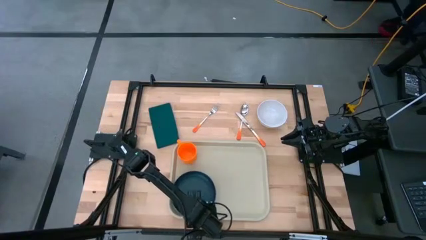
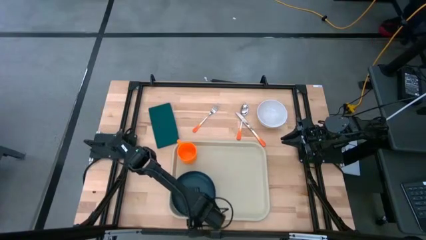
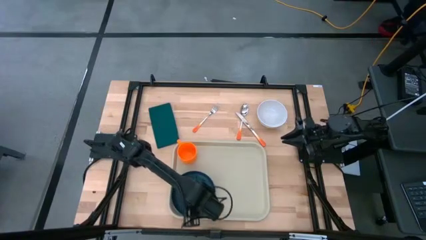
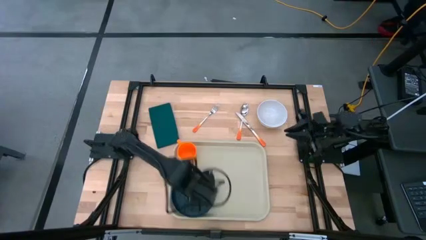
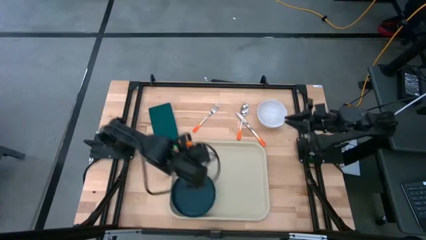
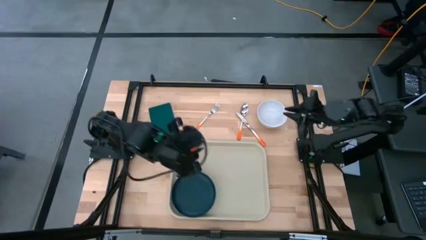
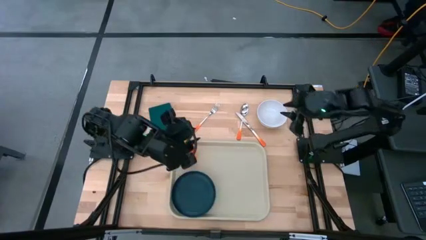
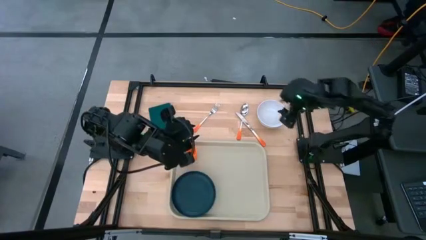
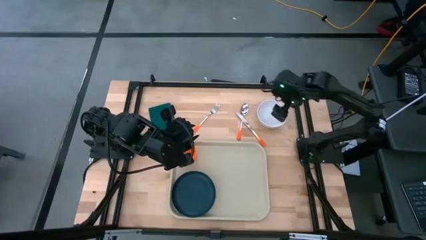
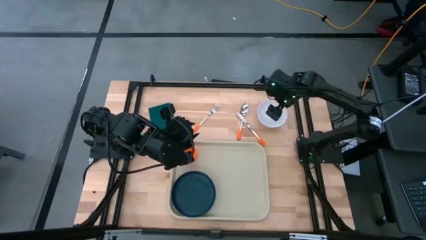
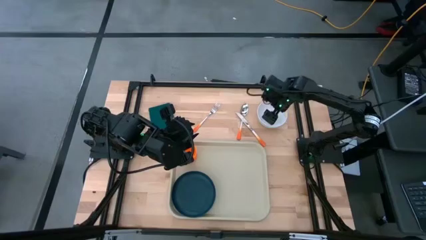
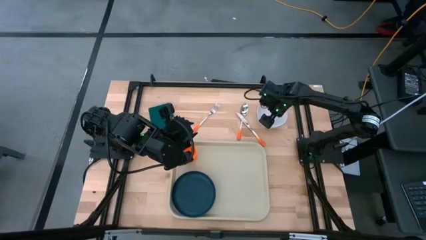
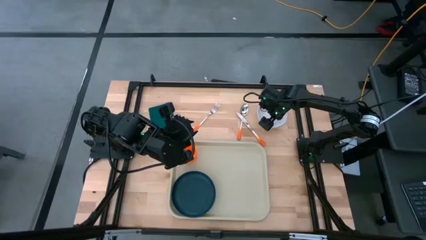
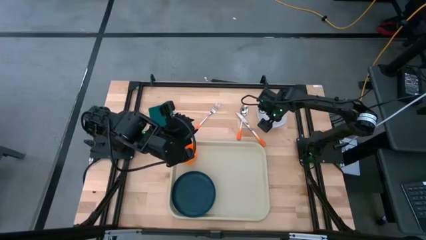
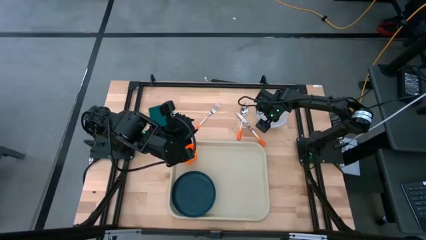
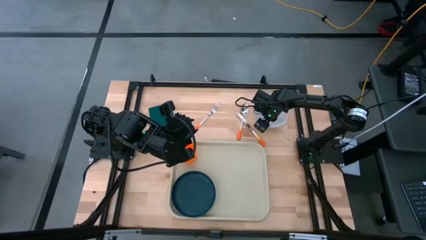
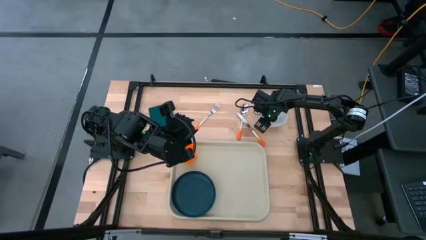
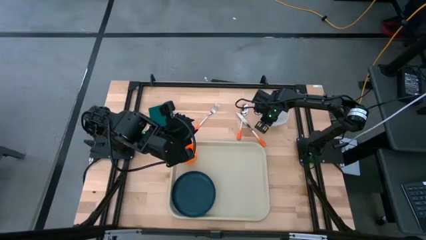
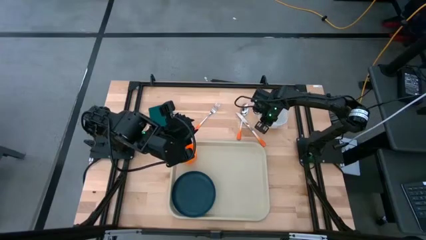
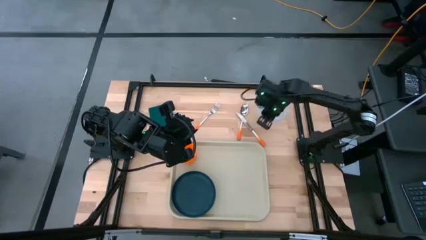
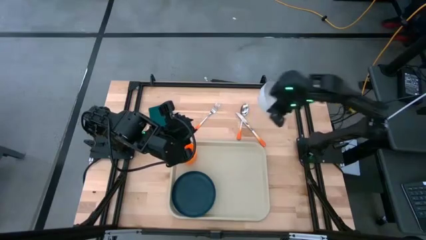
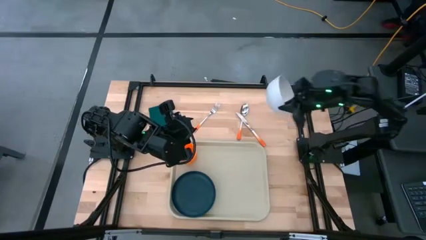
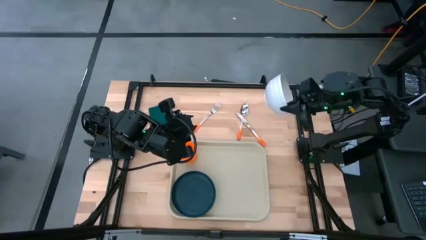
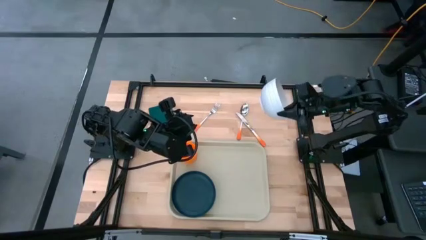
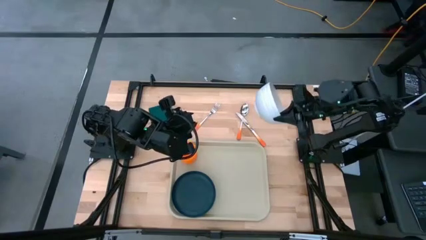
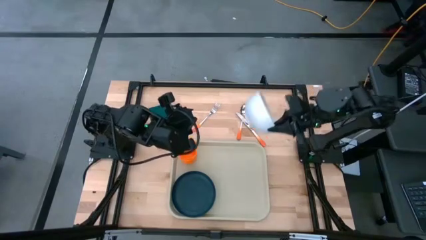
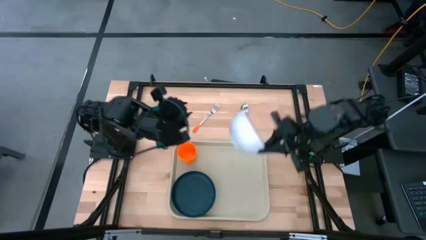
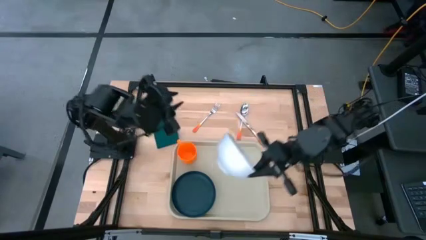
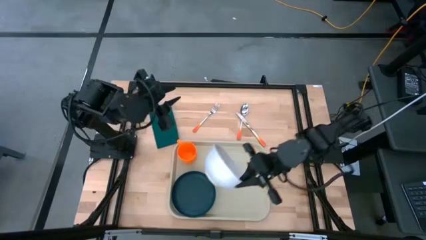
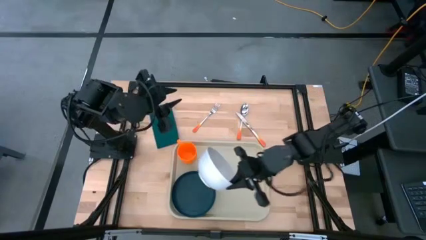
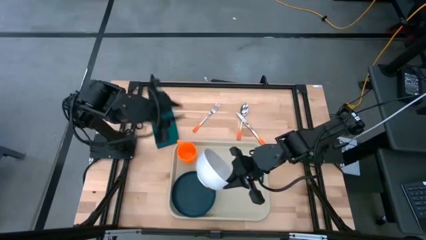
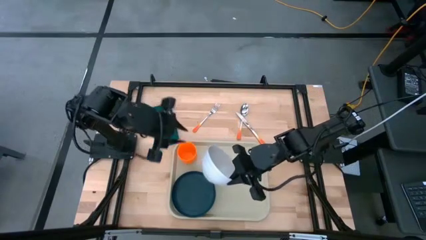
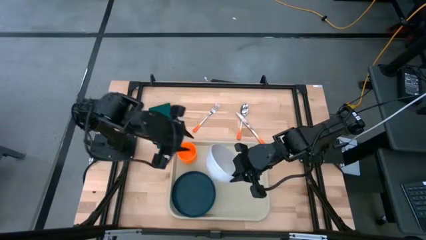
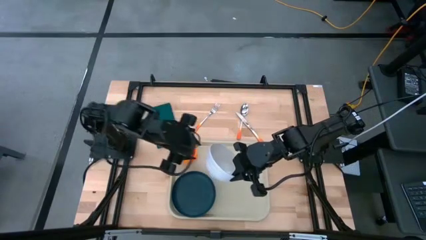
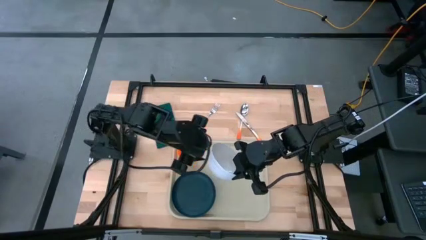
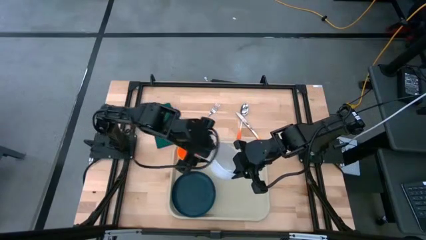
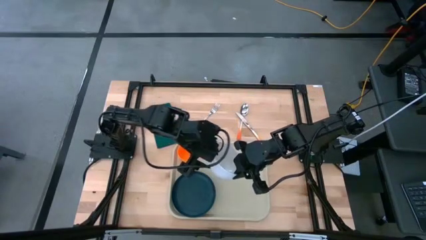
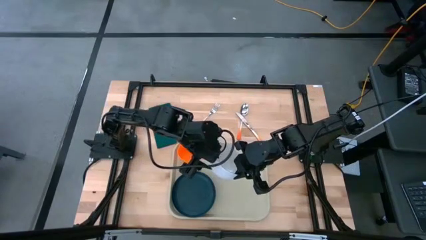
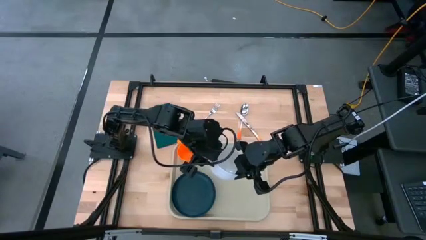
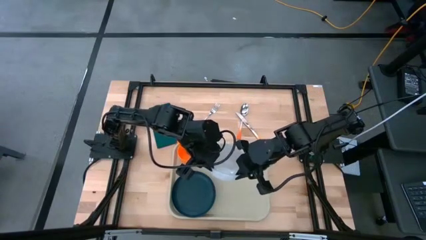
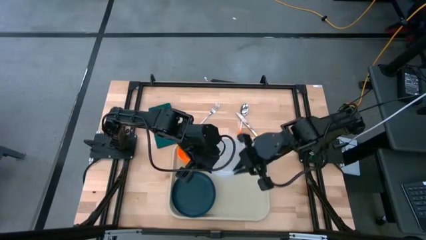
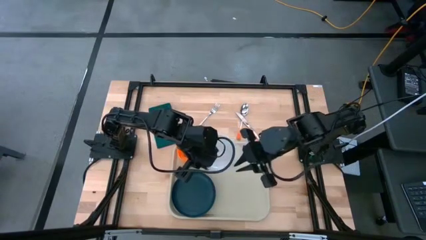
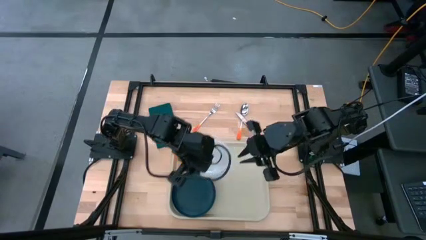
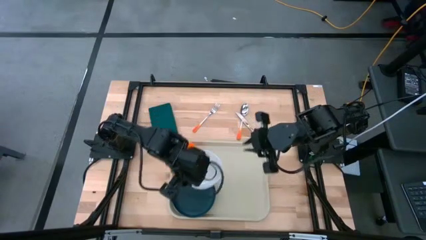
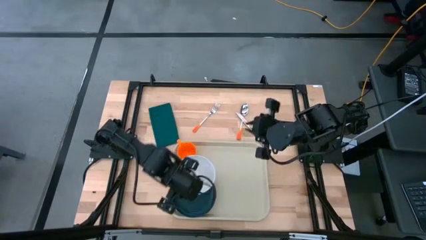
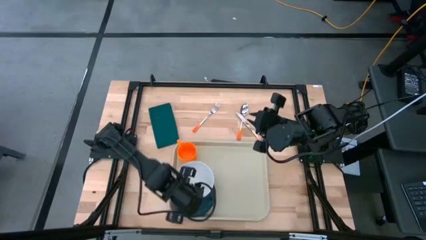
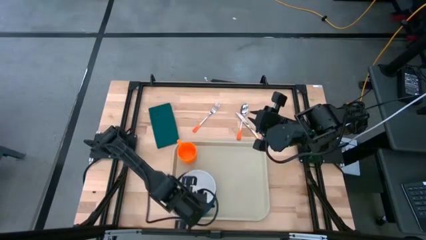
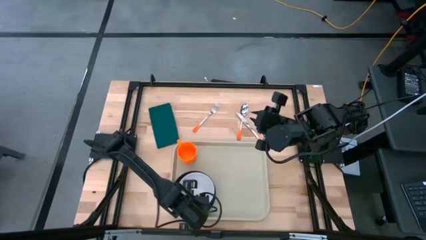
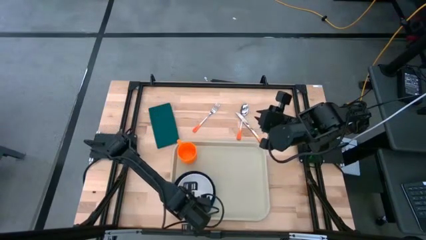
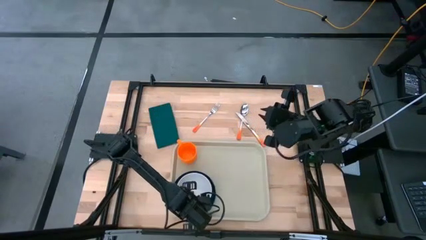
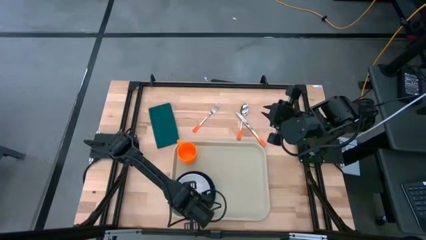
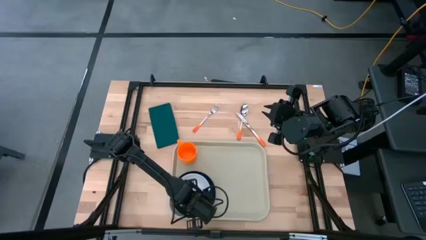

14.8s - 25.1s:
Task: Set up tray
Put the bowl on the plate
